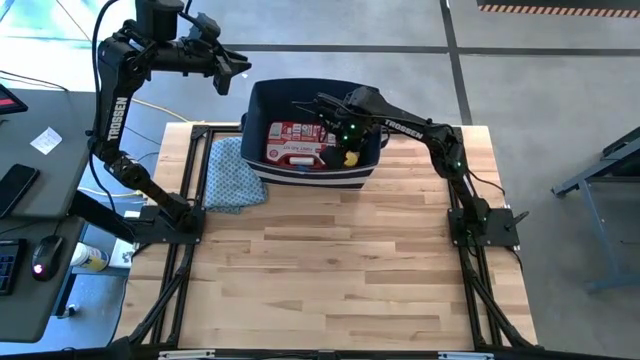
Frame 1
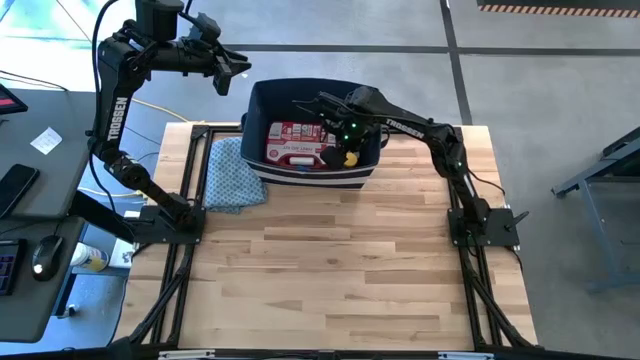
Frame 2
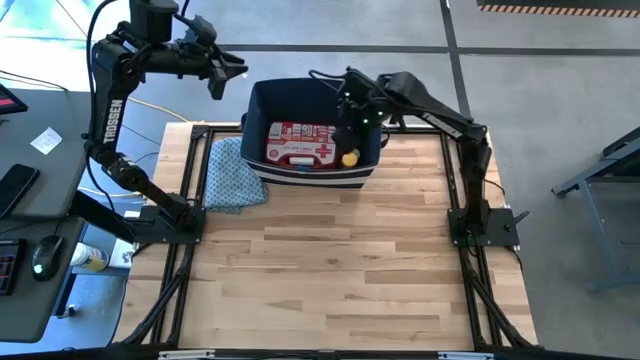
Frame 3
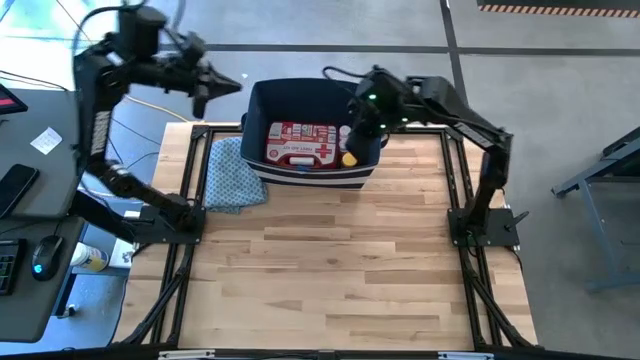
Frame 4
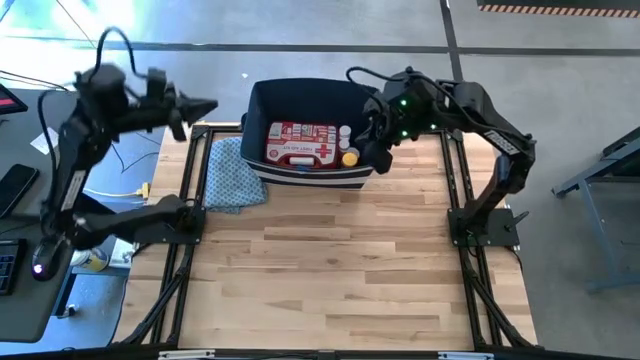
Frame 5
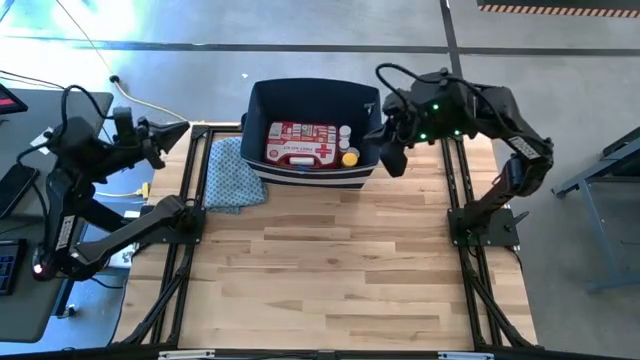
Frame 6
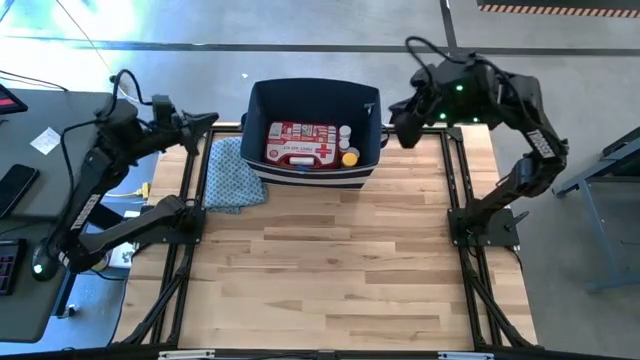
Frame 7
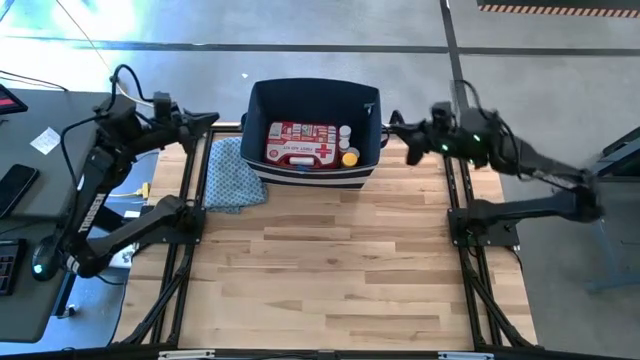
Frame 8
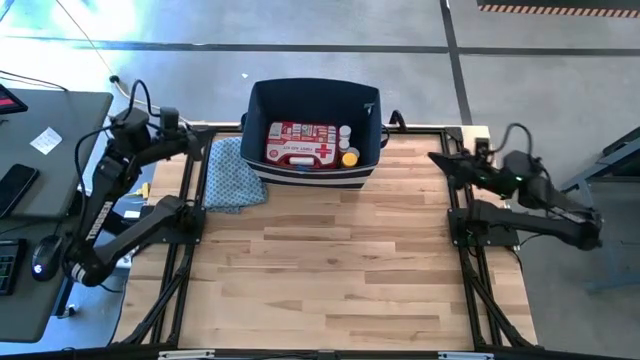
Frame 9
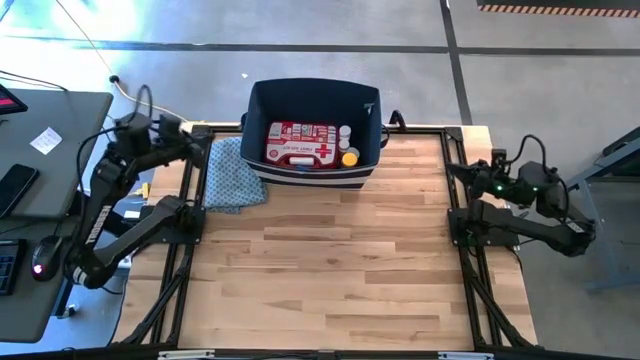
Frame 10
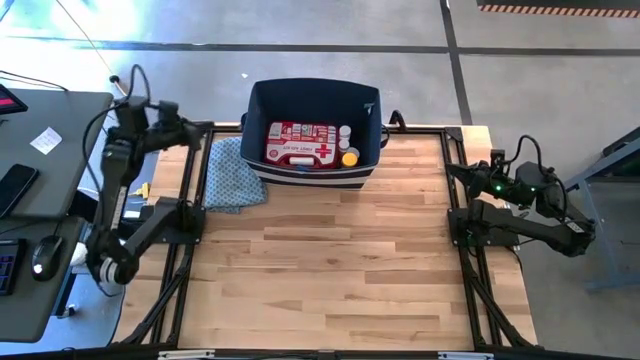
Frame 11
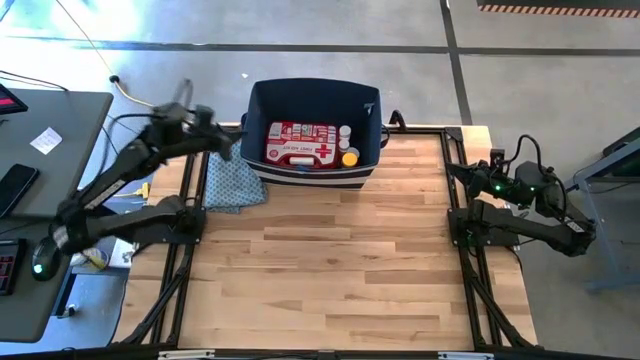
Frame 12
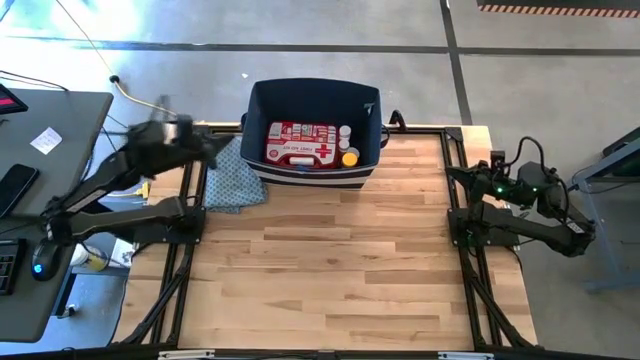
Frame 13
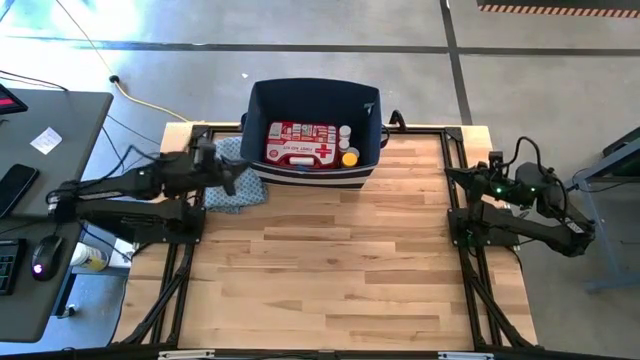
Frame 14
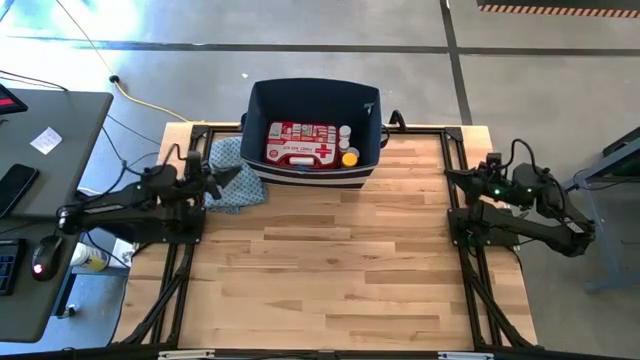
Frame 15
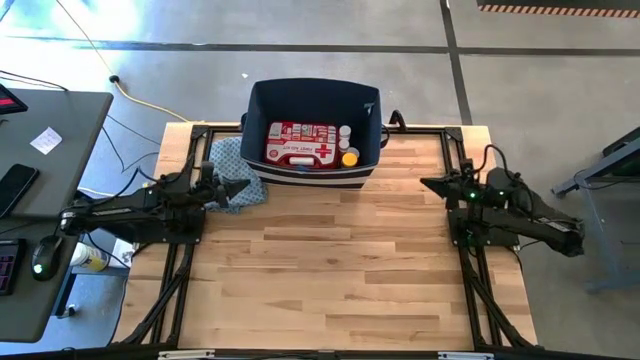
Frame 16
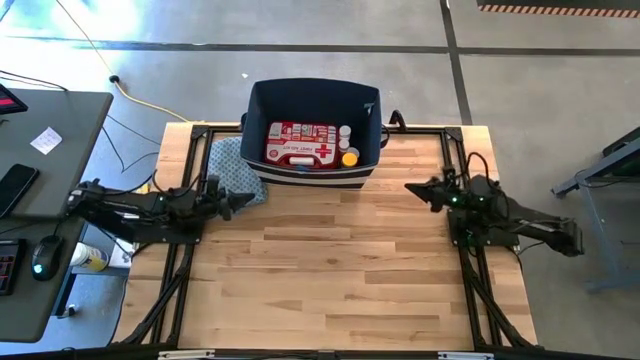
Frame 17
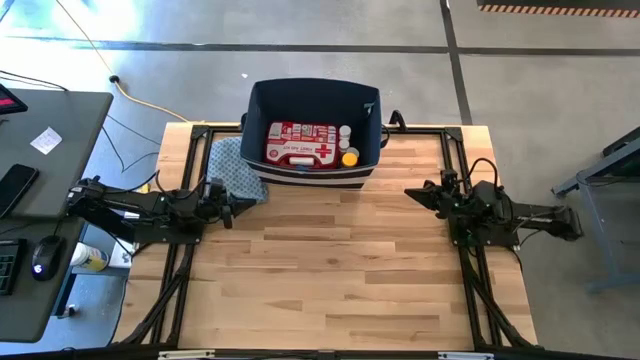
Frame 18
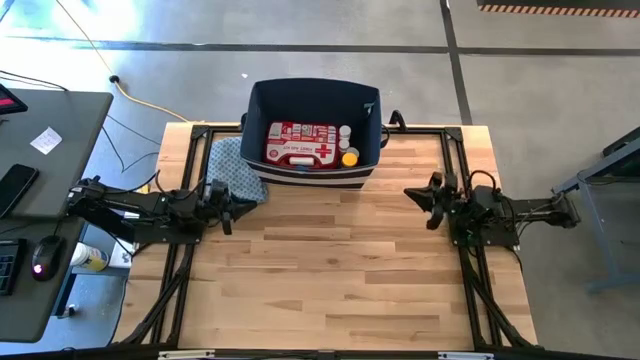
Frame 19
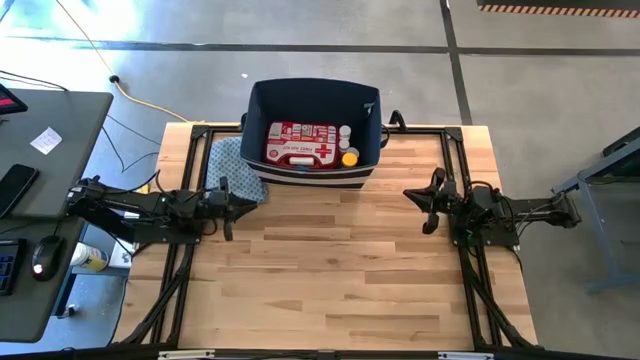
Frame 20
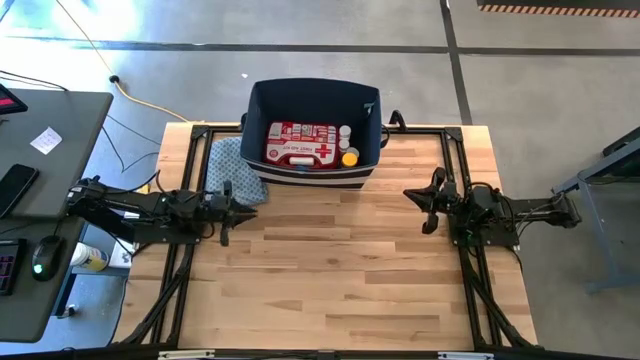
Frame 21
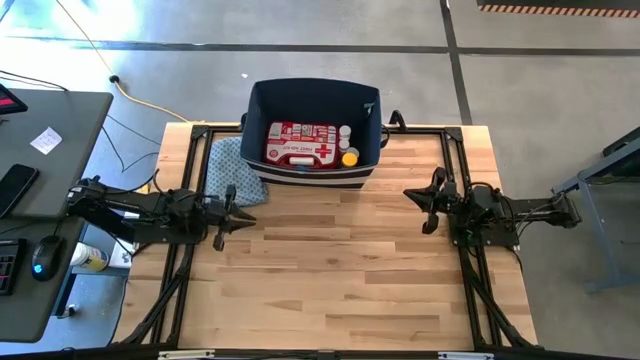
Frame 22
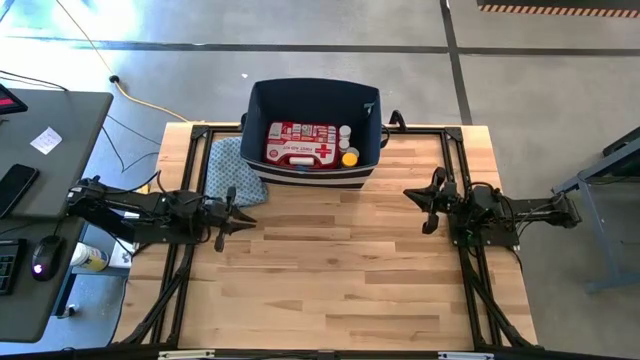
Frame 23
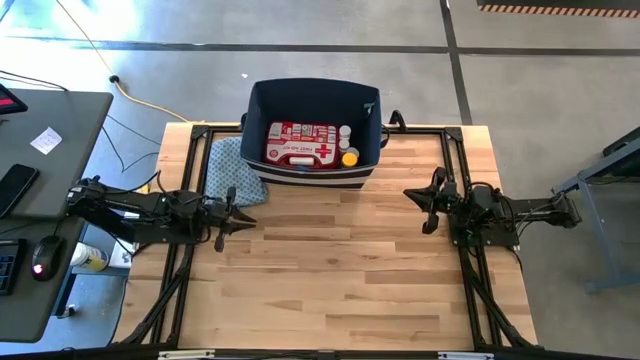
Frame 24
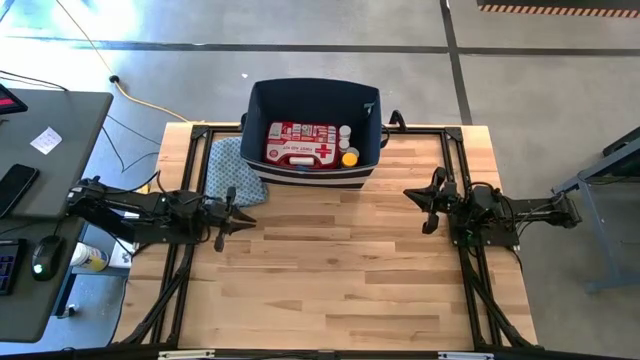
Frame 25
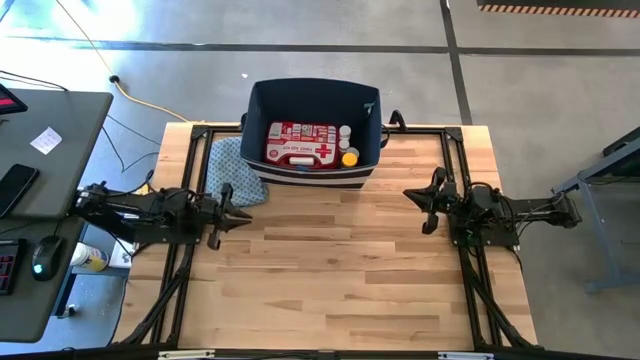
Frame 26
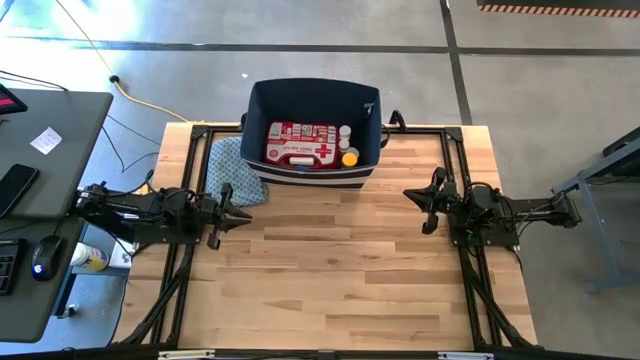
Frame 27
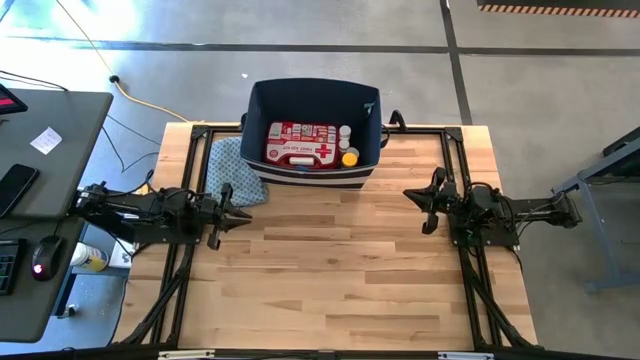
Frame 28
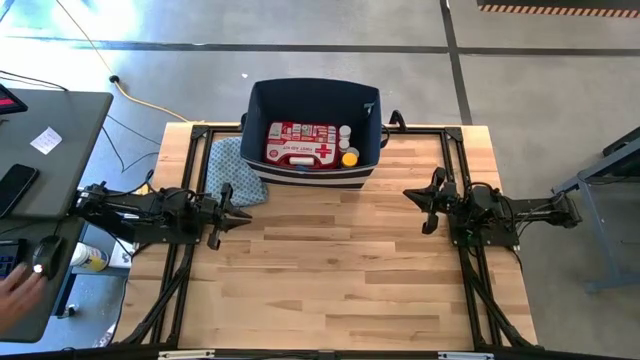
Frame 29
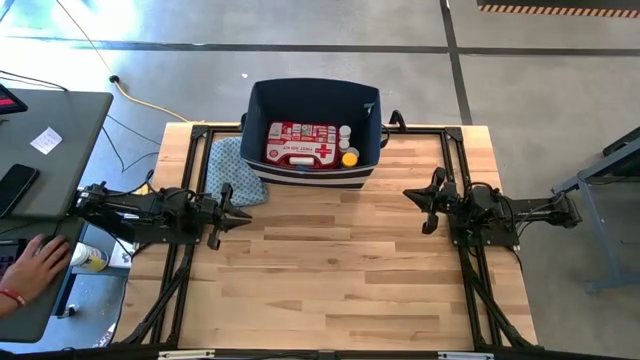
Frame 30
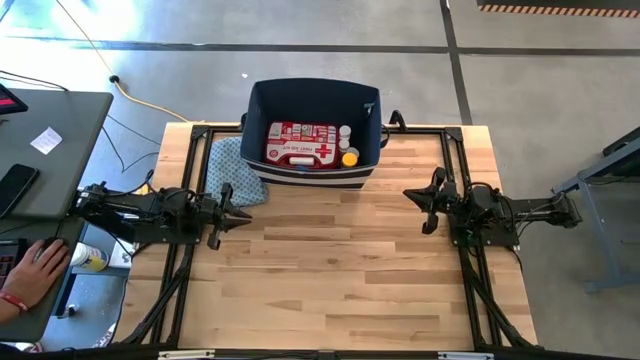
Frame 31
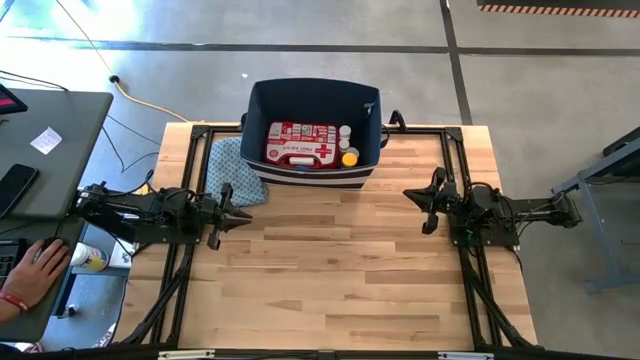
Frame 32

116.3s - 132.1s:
Task: Pick & place medical supplies in basket/bin
Return to Home Position

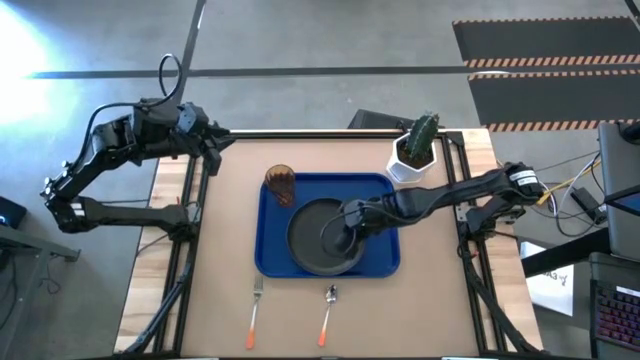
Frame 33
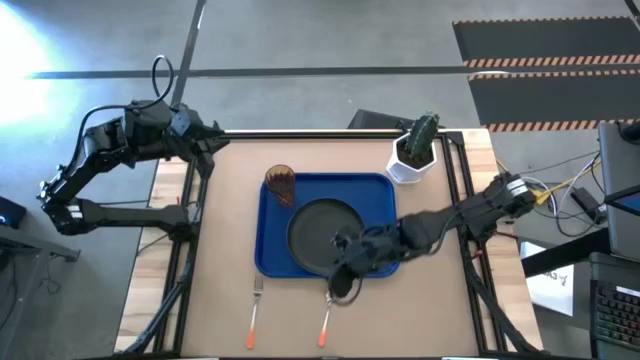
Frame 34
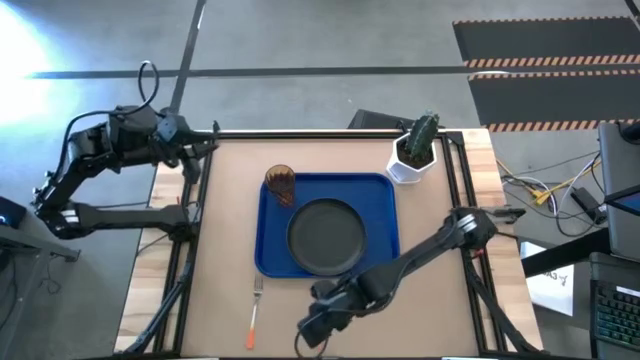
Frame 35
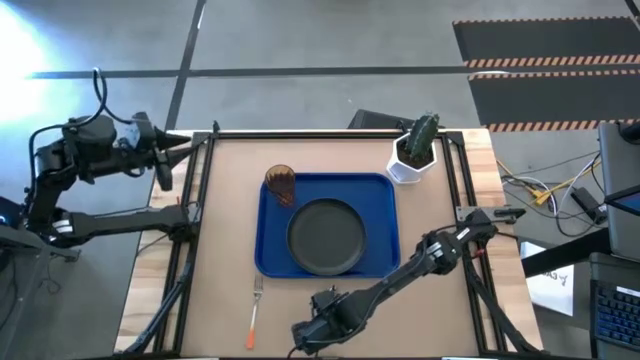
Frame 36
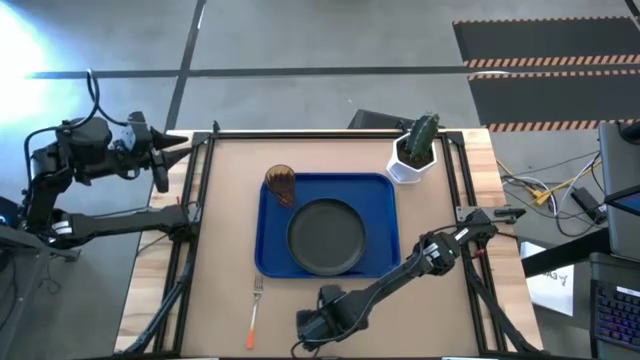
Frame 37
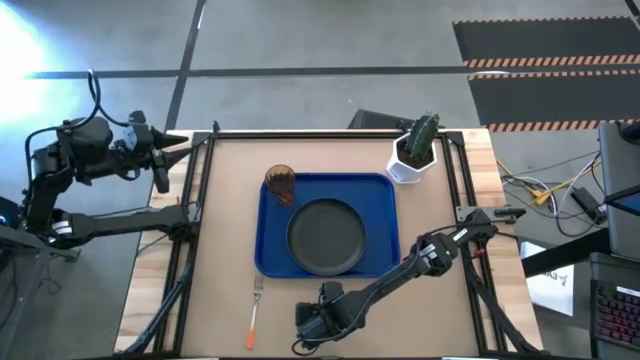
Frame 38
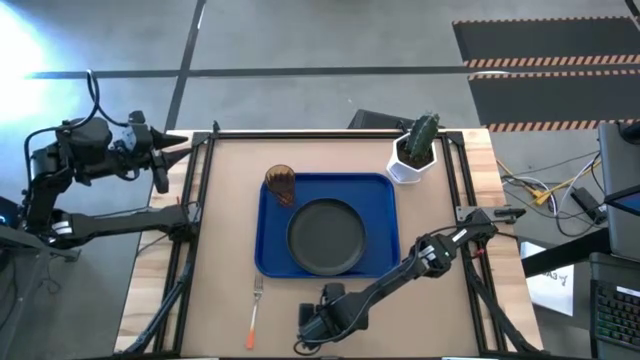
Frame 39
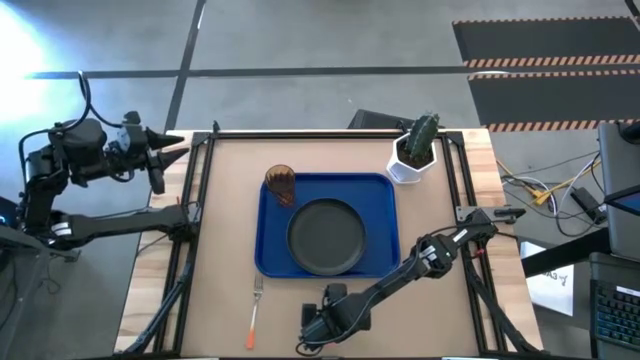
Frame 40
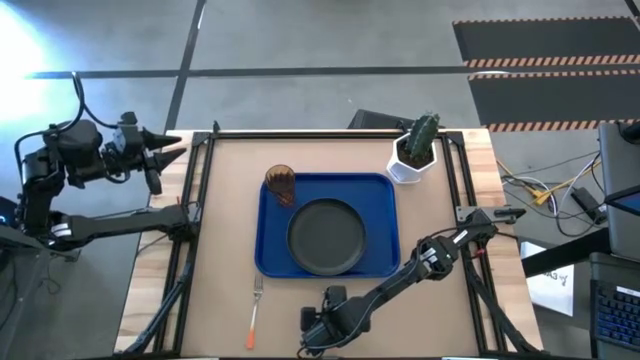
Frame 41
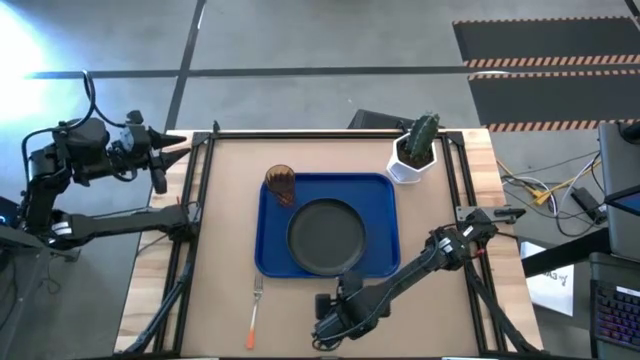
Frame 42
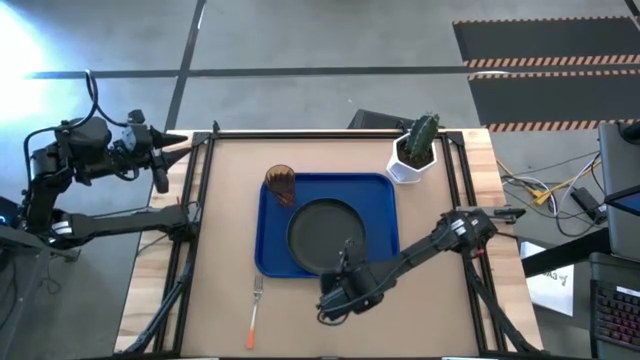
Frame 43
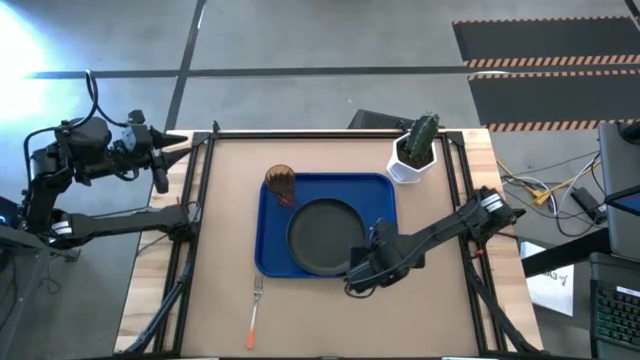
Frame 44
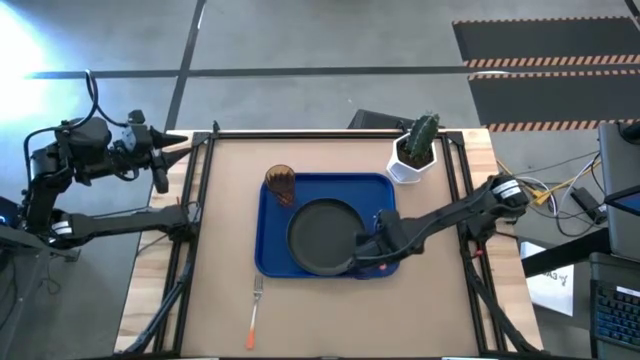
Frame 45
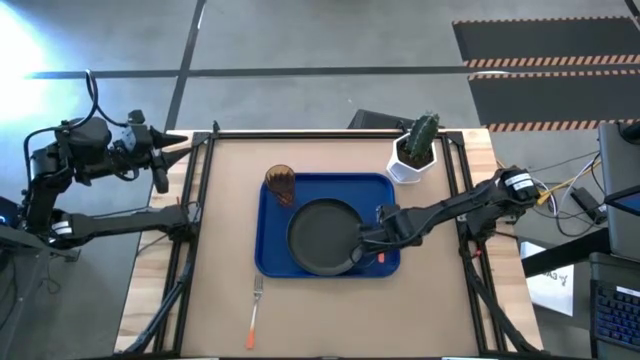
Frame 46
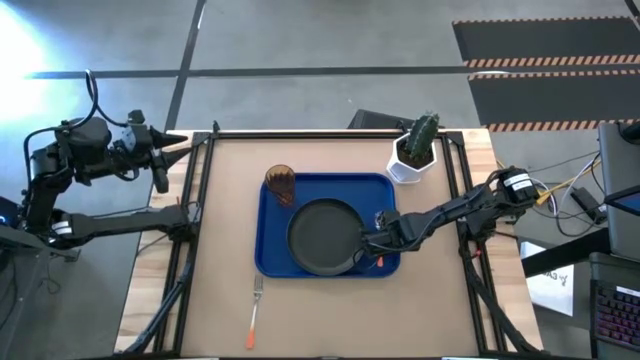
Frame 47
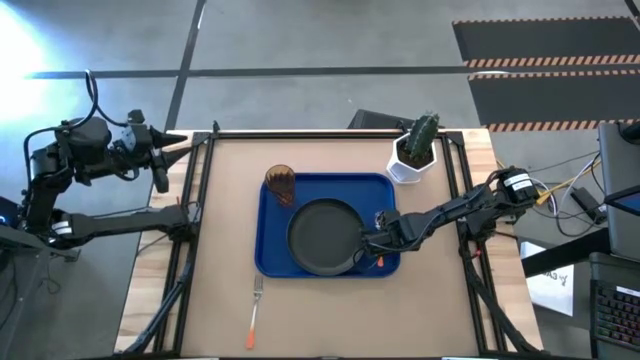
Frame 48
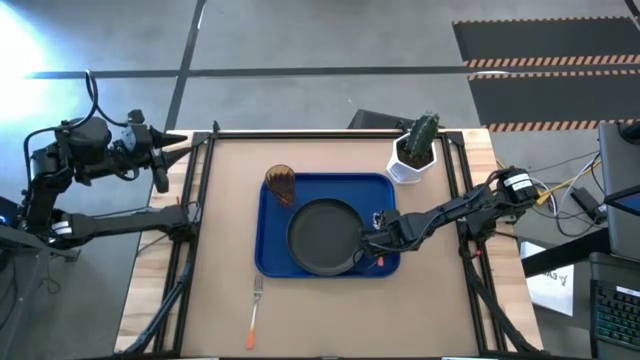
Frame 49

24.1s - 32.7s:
Task: Pick and place plate/cup/fork/spoon on tray
Put the orange spoon on the blue tray to the right of the black plate
